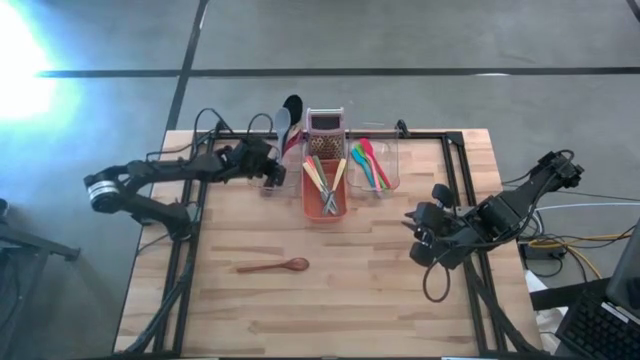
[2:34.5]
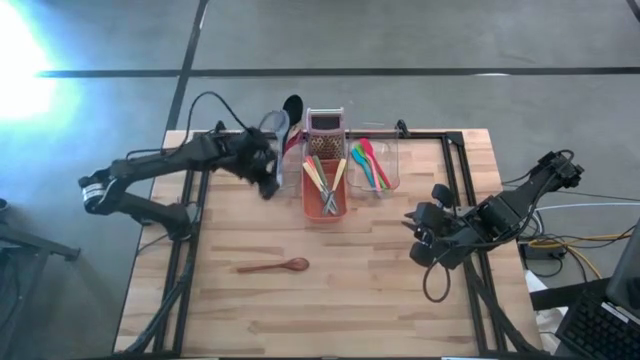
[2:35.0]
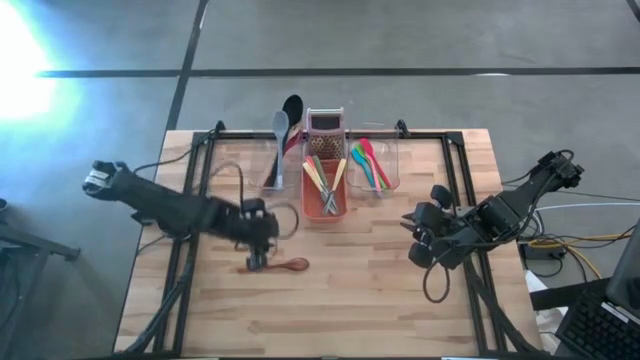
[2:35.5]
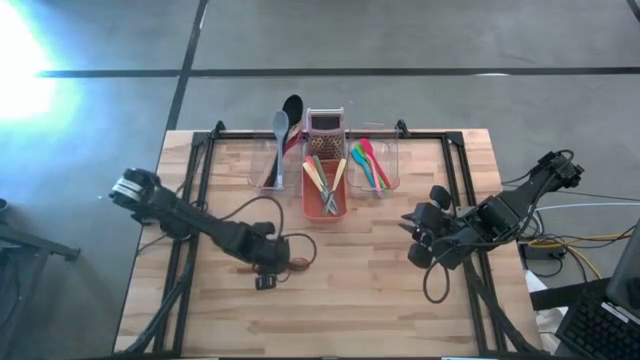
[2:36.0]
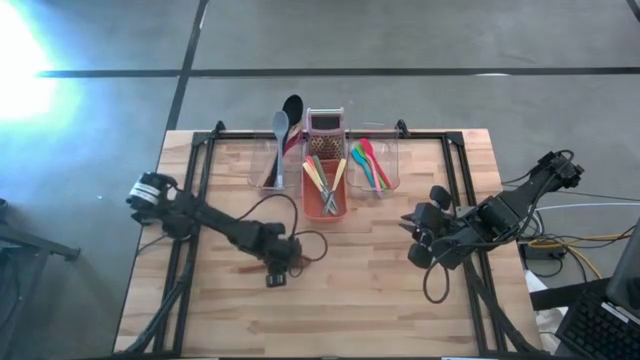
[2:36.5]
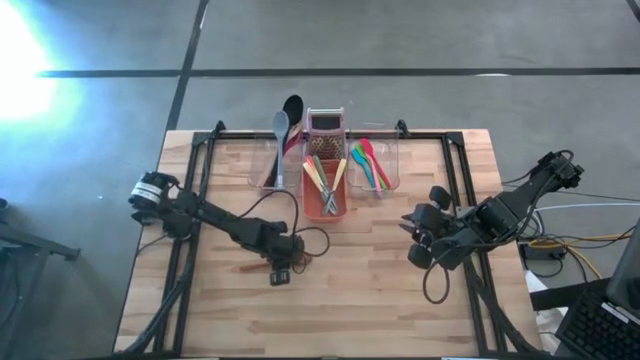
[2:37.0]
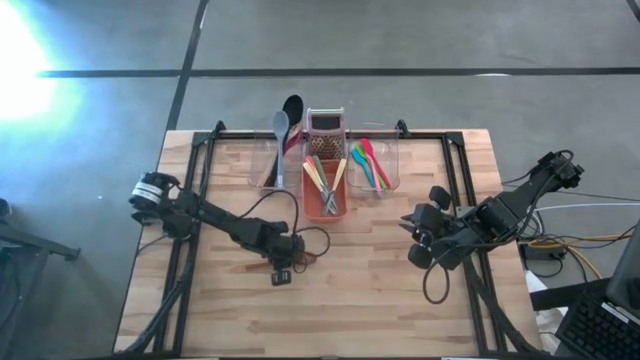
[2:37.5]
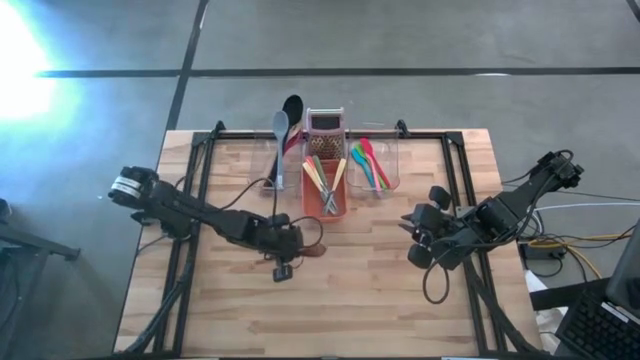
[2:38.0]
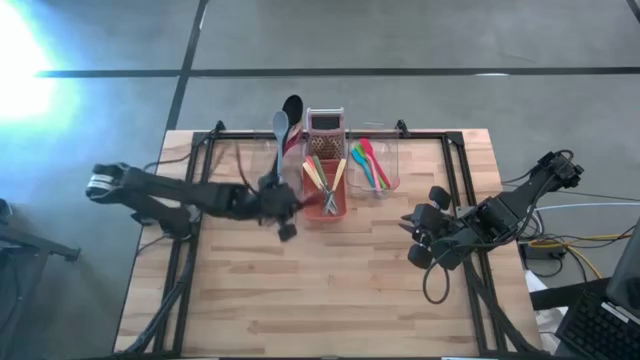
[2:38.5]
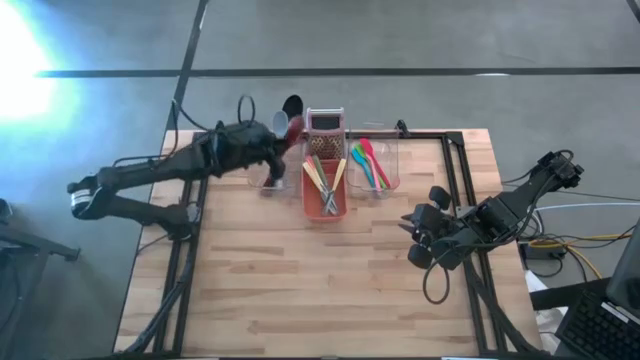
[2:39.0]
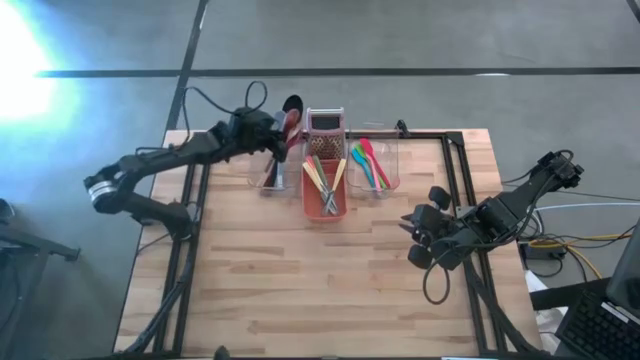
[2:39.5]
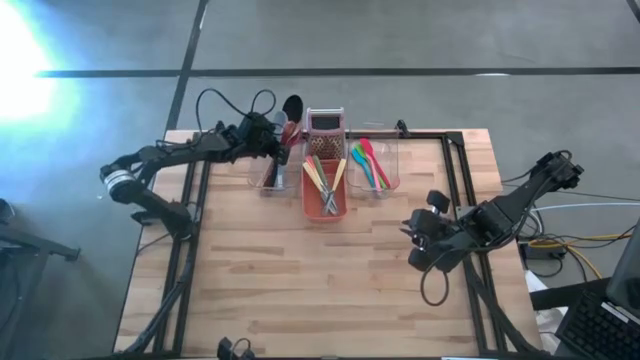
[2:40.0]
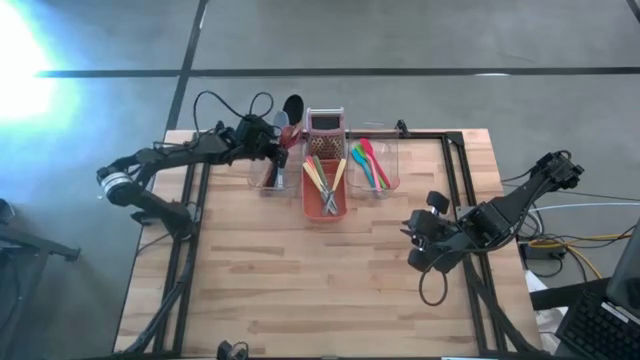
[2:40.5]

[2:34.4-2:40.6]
Task: Pick & Place Kitchen Items
Put the brown spoon into the left transparent bin

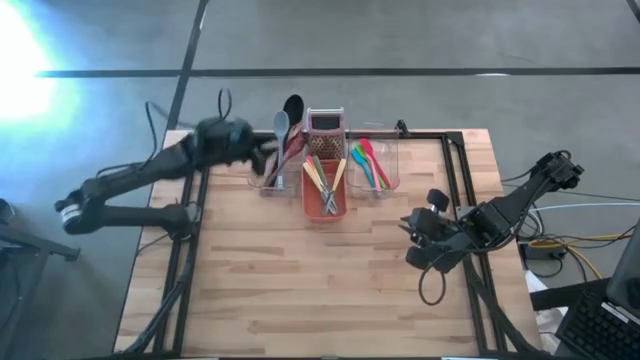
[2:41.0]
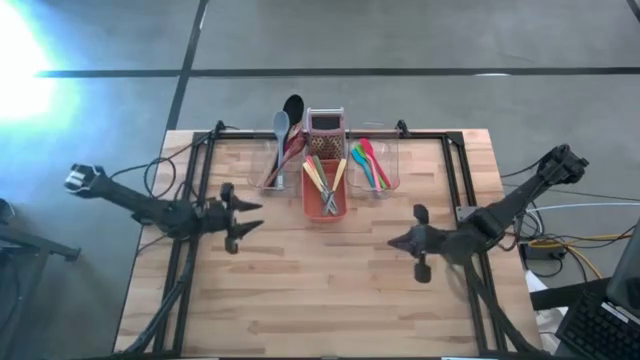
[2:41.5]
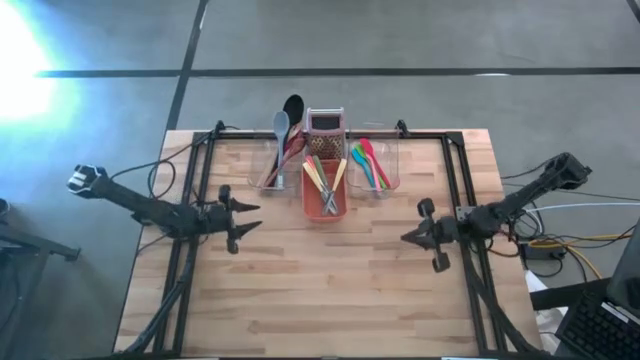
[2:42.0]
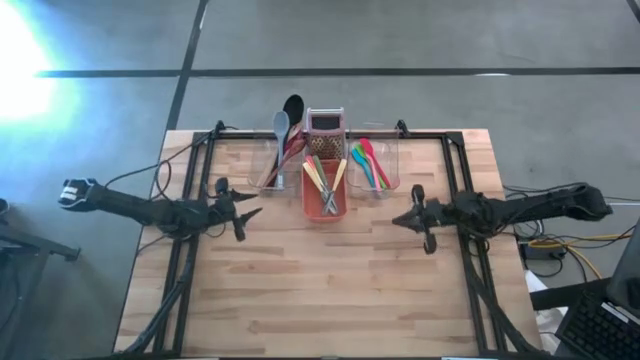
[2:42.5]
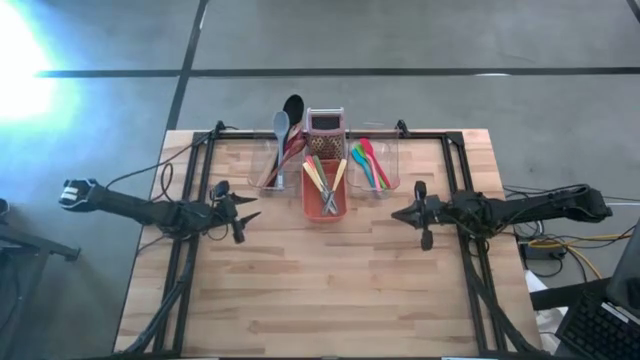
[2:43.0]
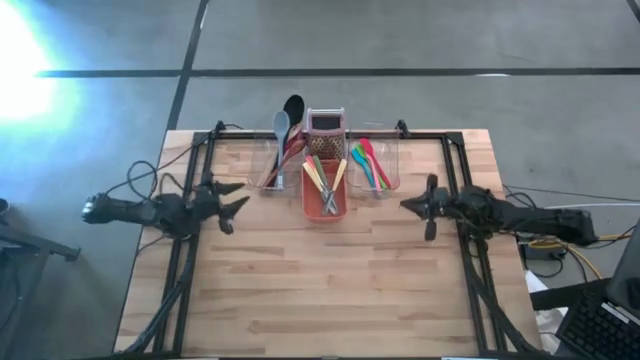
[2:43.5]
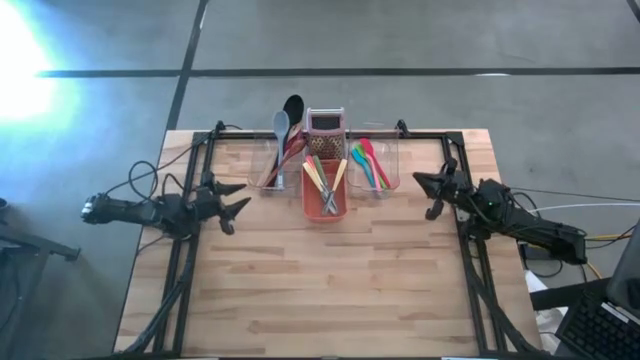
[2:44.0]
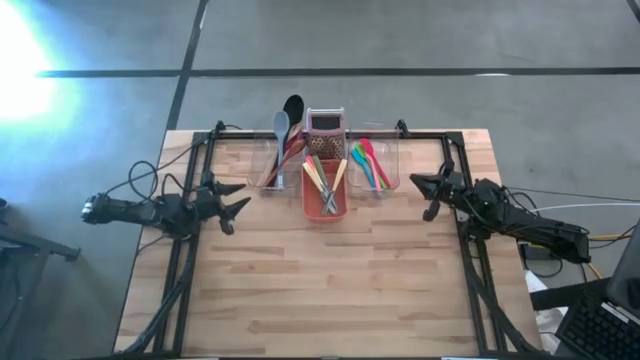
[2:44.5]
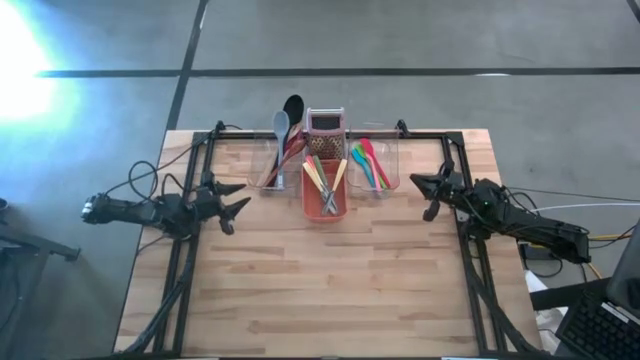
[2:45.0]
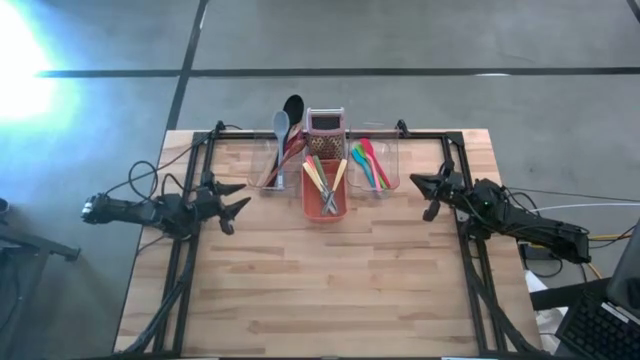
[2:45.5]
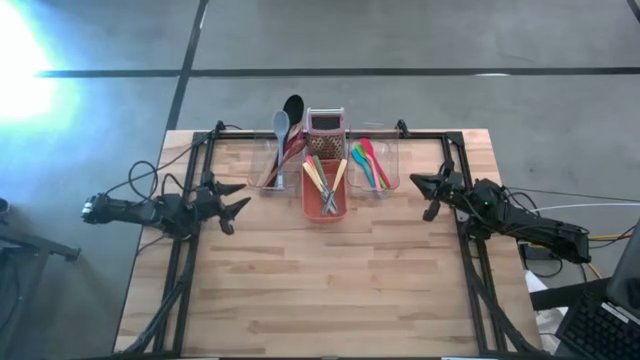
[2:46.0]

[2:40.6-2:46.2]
Return to Home Position

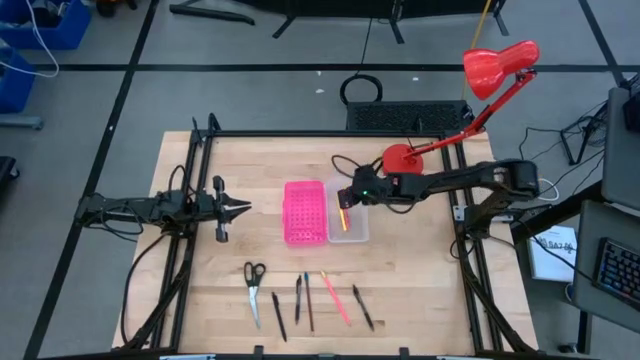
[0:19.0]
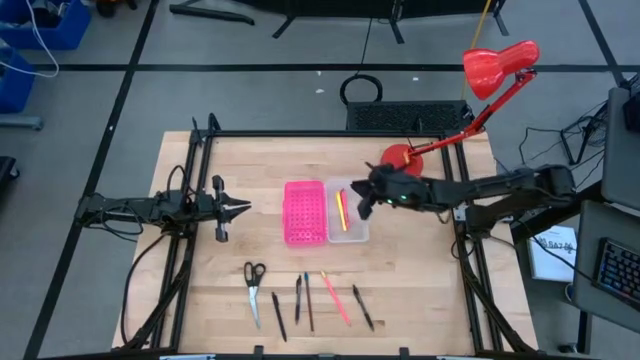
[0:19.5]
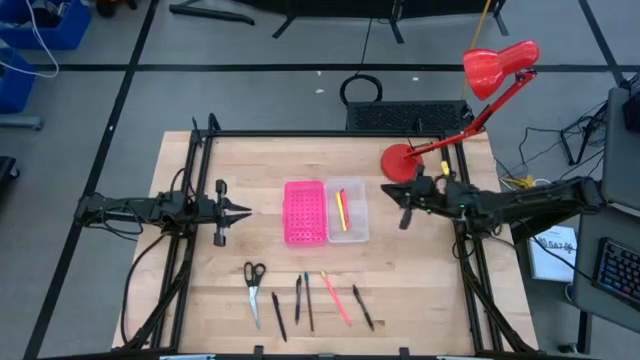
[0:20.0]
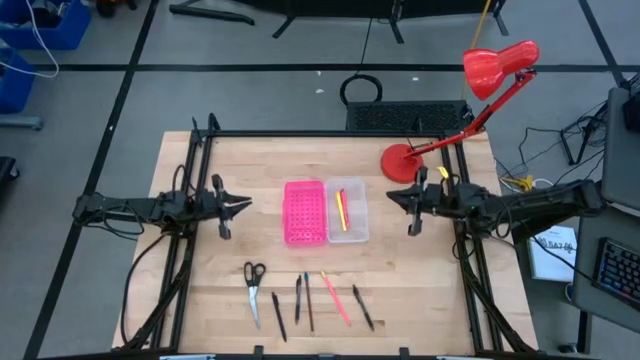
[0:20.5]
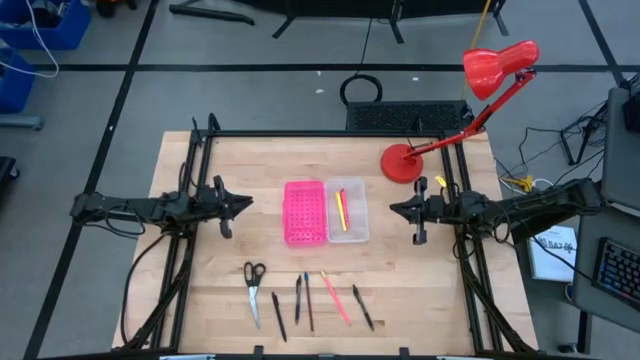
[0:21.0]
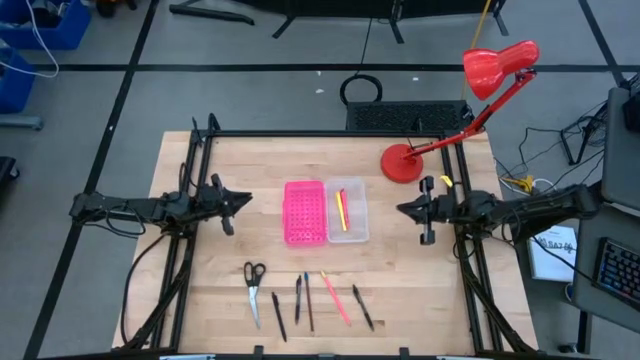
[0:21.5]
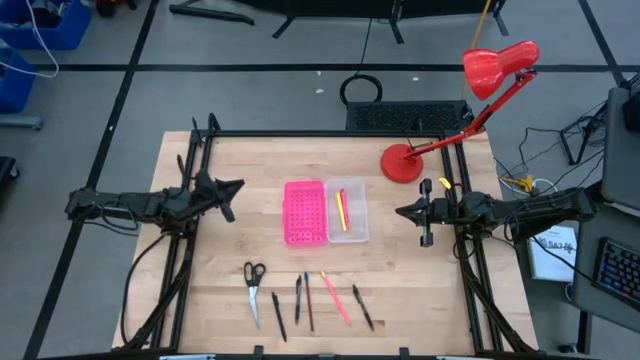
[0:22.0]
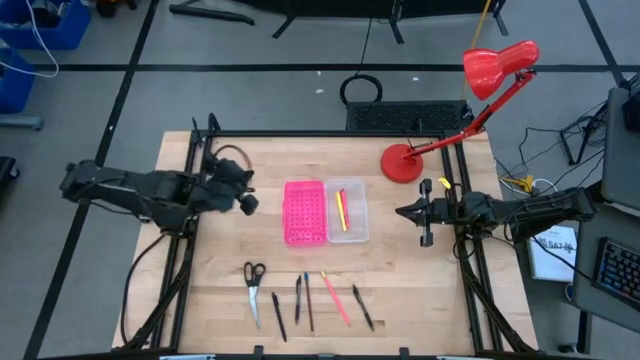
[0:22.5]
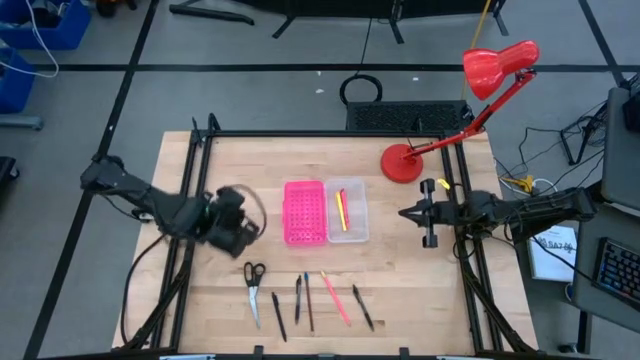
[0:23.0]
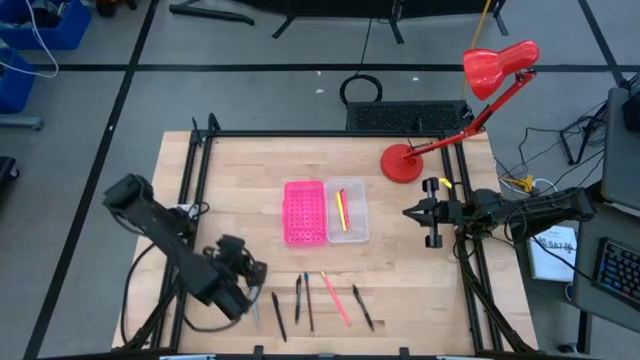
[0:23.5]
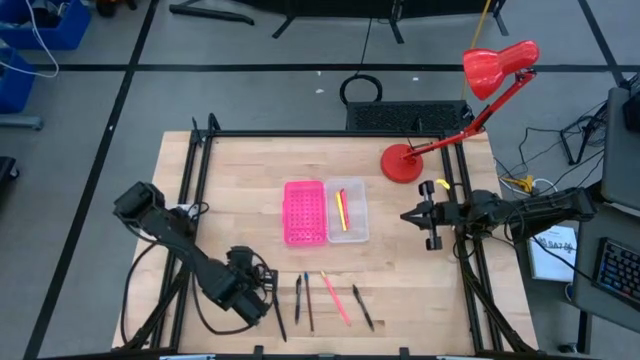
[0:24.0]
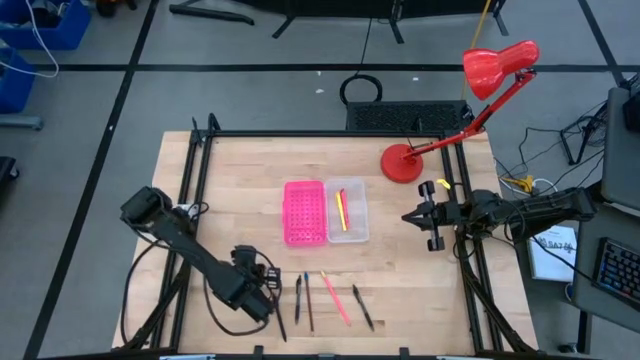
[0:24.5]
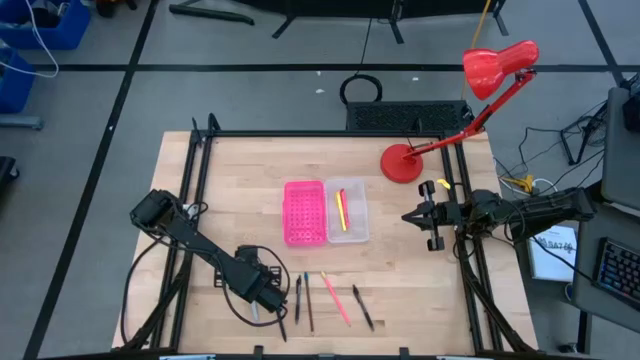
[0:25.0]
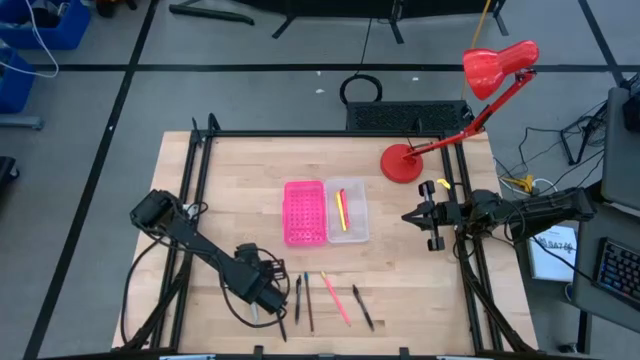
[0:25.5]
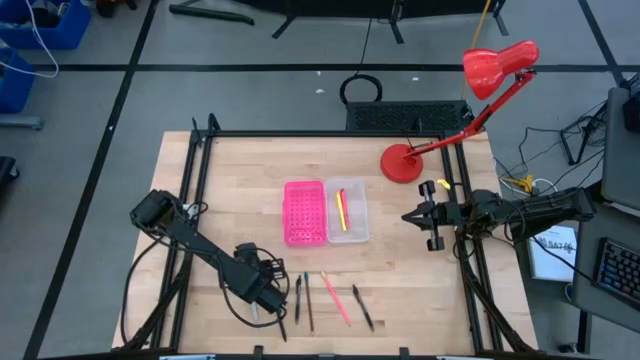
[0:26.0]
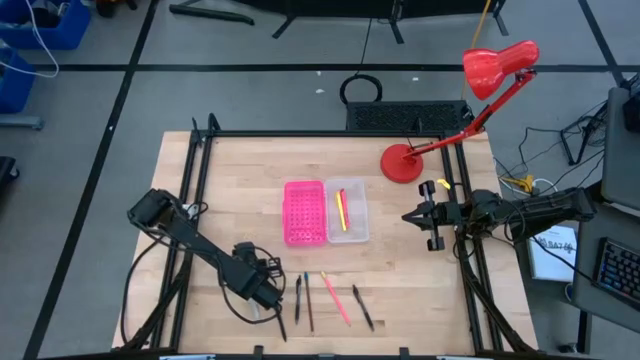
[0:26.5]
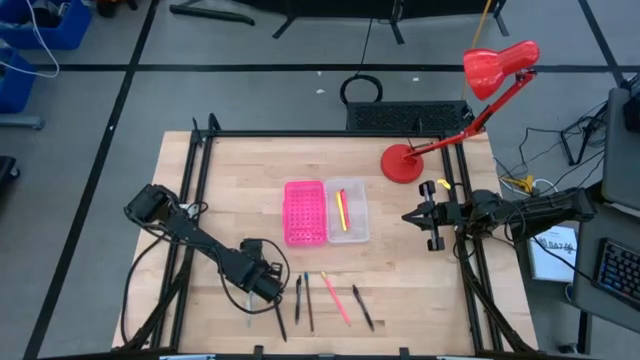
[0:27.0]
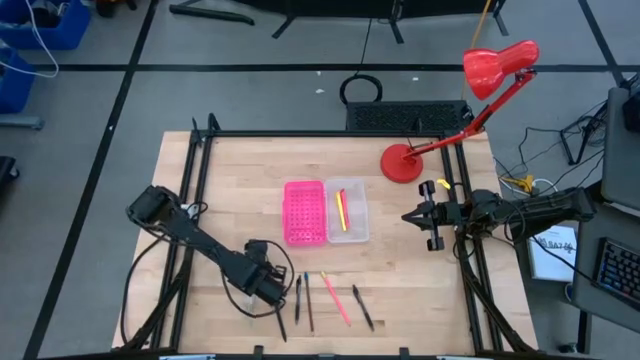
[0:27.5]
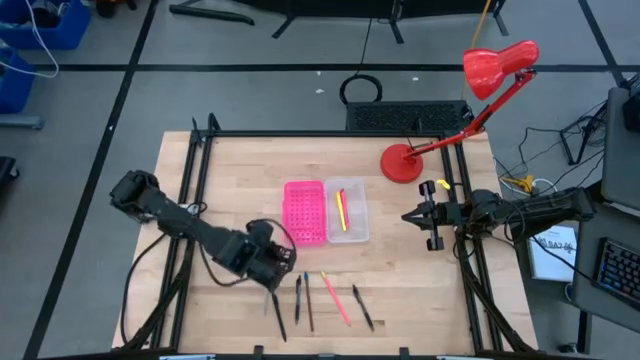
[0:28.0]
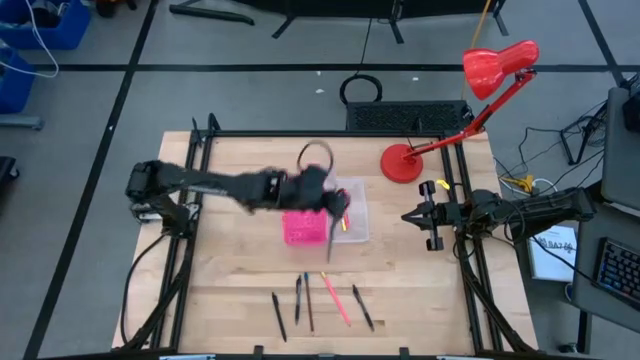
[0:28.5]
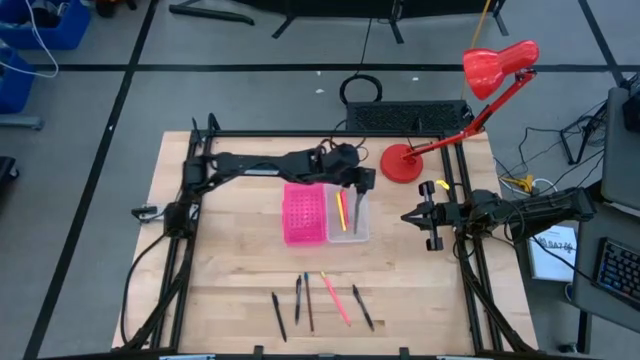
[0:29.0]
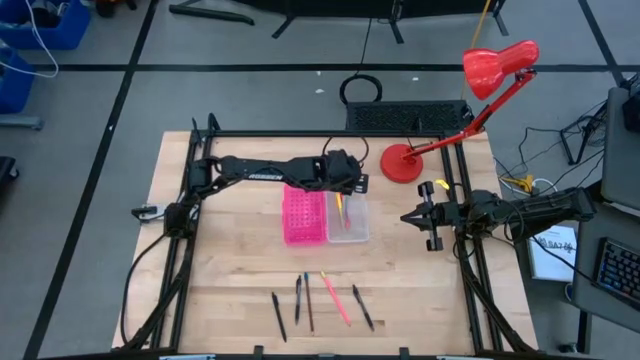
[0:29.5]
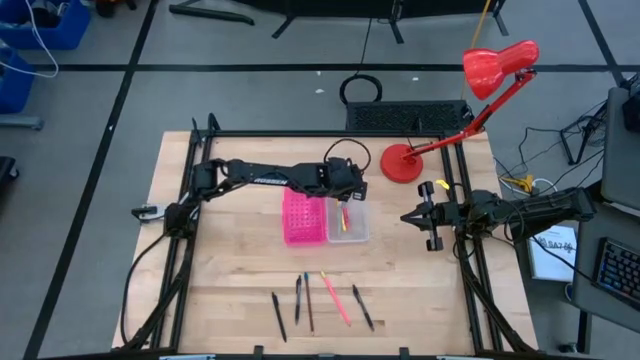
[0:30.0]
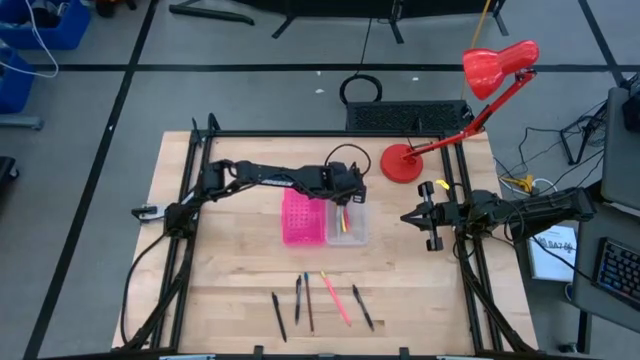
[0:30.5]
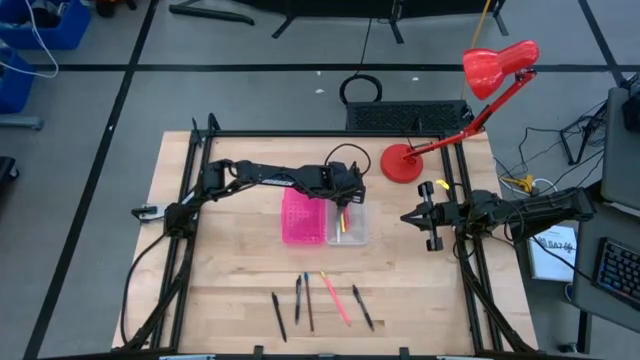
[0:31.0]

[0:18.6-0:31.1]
Task: Pick & place school supplies into a supply box
Put the scissors into the supply box
